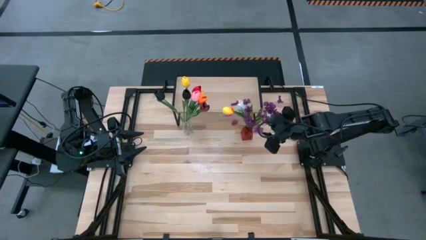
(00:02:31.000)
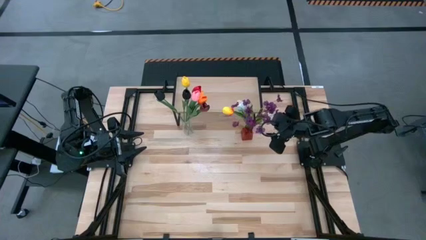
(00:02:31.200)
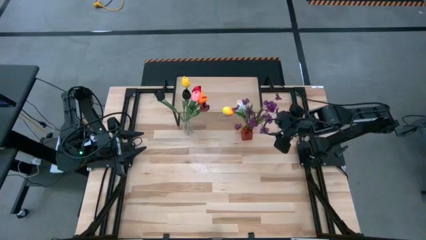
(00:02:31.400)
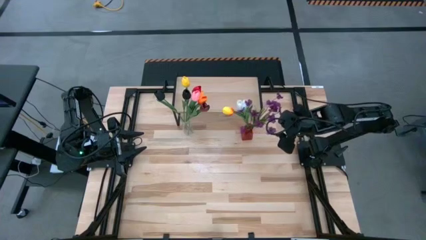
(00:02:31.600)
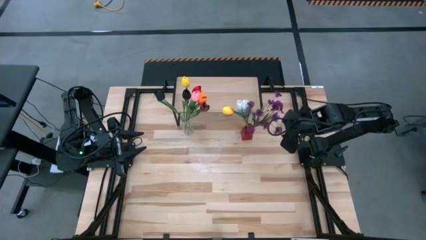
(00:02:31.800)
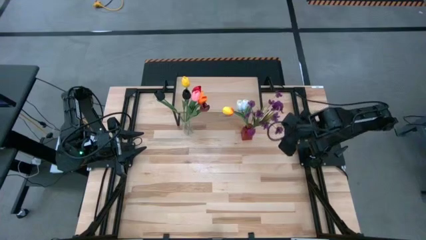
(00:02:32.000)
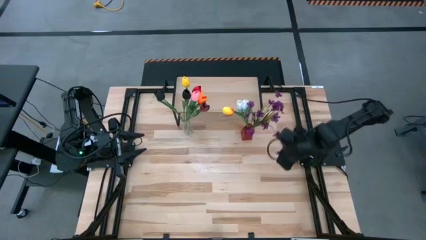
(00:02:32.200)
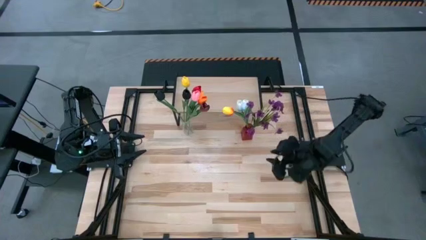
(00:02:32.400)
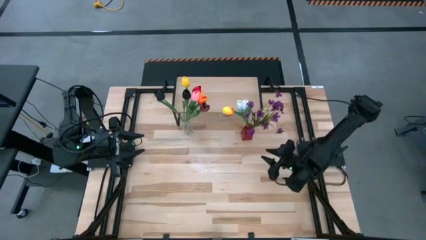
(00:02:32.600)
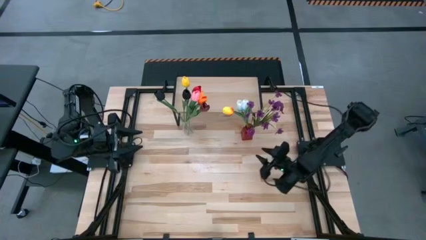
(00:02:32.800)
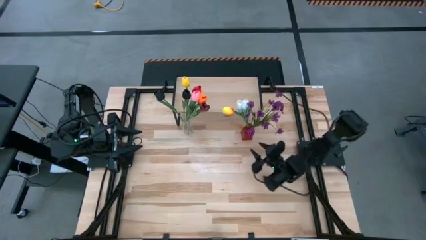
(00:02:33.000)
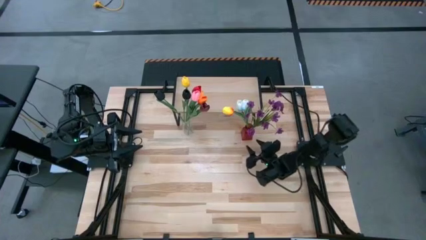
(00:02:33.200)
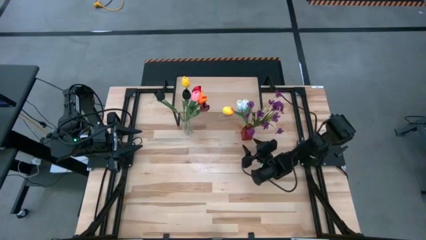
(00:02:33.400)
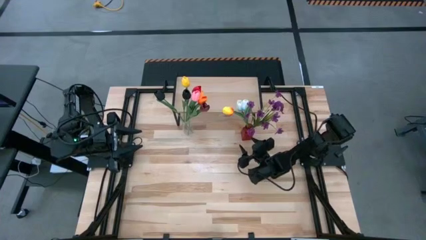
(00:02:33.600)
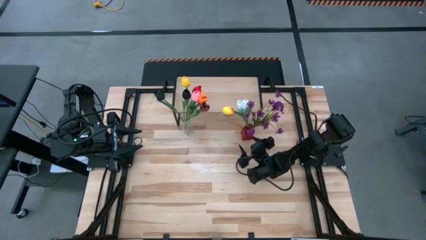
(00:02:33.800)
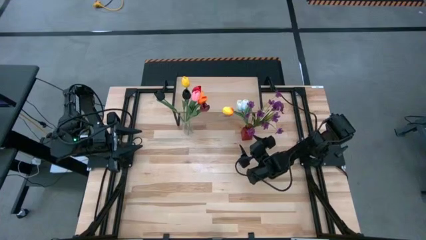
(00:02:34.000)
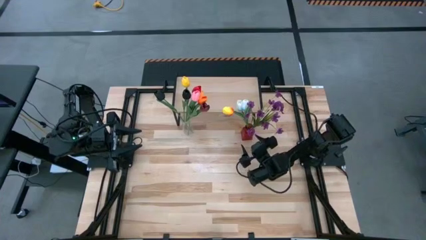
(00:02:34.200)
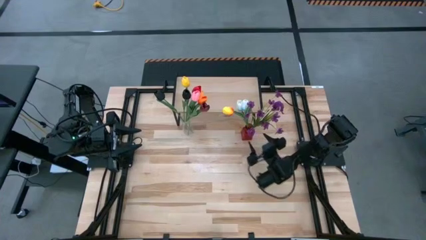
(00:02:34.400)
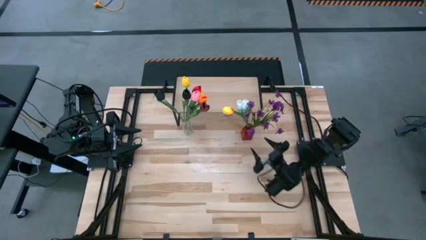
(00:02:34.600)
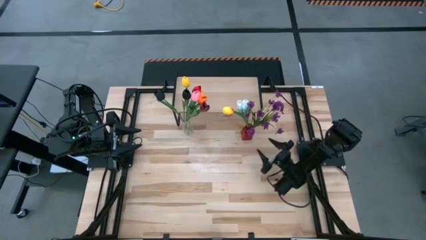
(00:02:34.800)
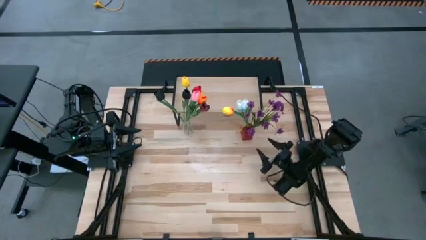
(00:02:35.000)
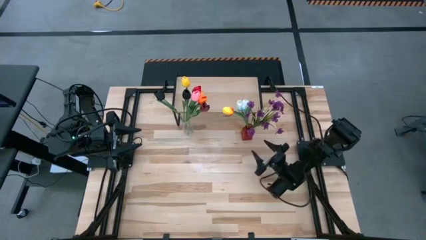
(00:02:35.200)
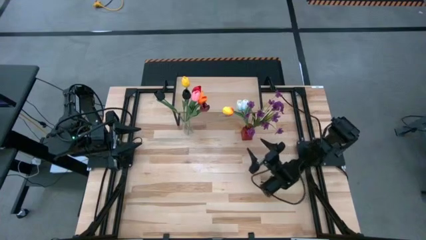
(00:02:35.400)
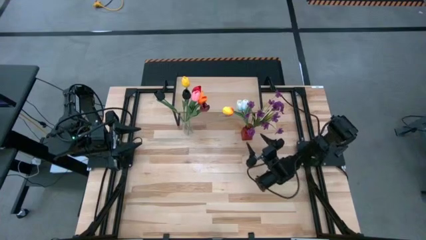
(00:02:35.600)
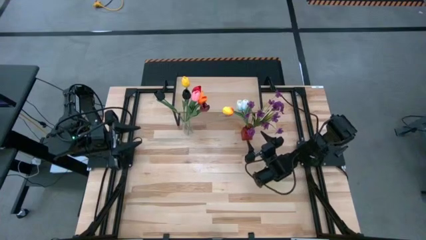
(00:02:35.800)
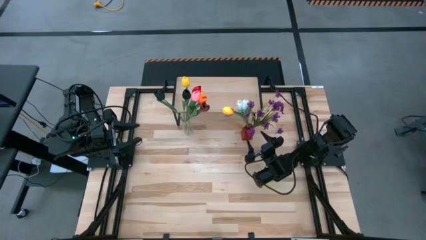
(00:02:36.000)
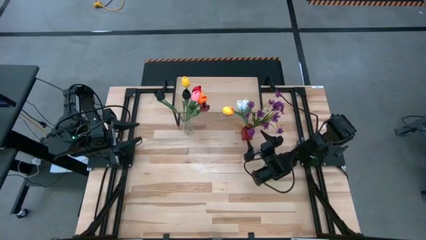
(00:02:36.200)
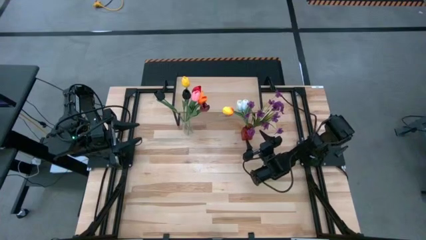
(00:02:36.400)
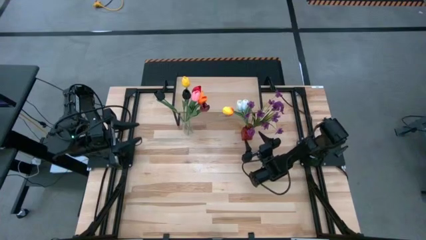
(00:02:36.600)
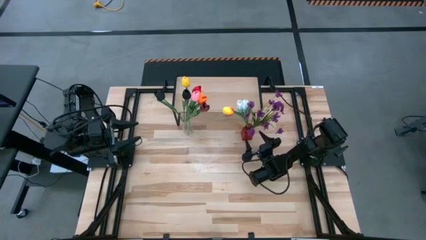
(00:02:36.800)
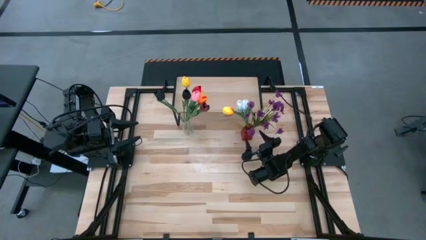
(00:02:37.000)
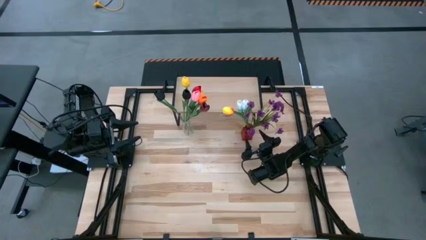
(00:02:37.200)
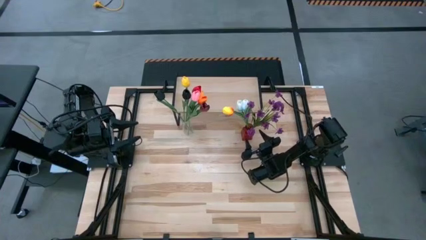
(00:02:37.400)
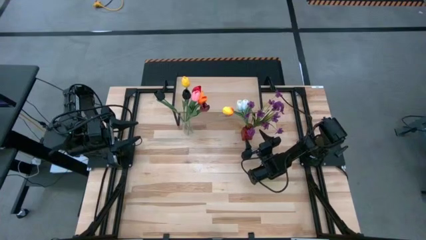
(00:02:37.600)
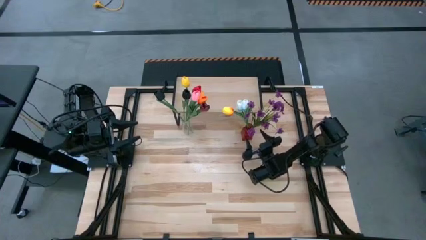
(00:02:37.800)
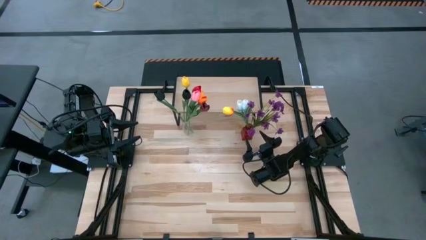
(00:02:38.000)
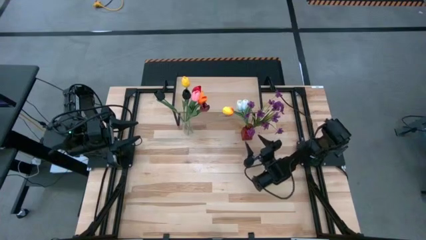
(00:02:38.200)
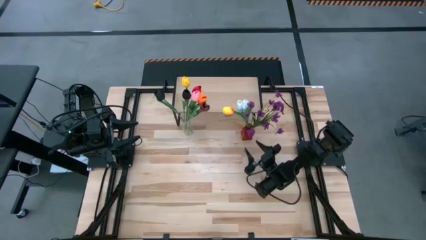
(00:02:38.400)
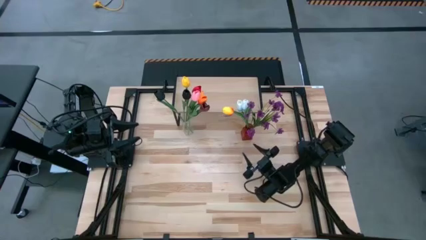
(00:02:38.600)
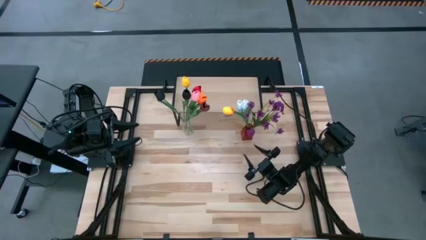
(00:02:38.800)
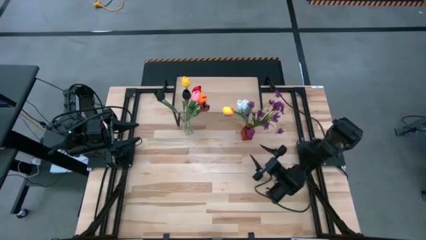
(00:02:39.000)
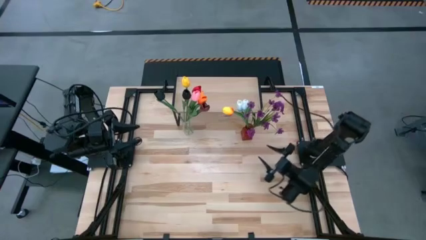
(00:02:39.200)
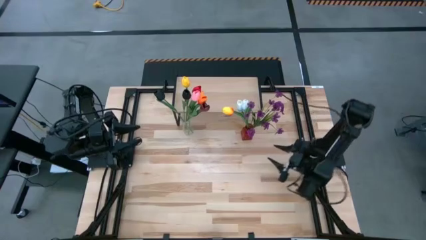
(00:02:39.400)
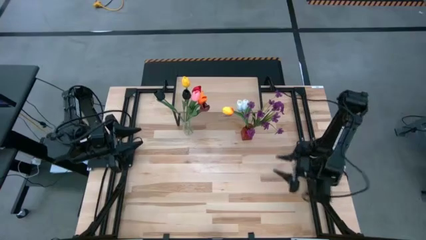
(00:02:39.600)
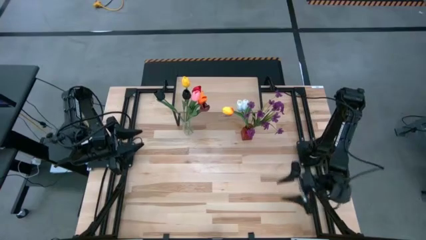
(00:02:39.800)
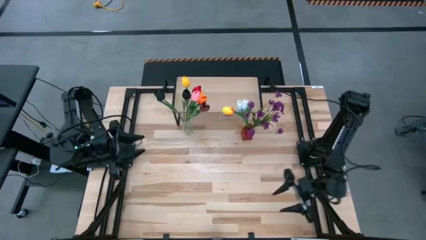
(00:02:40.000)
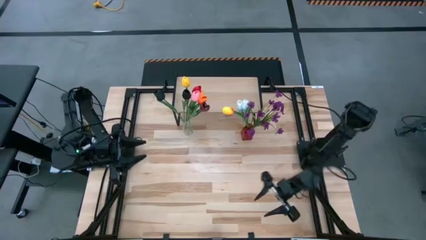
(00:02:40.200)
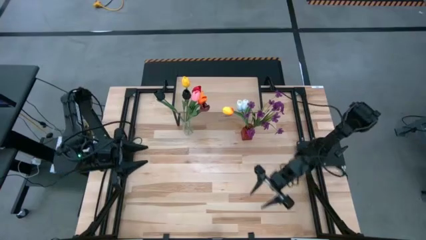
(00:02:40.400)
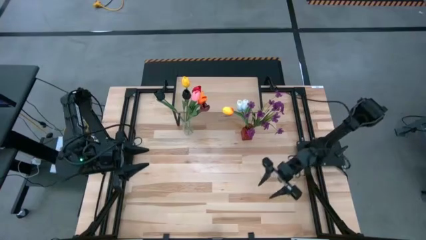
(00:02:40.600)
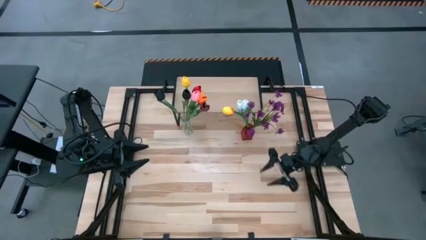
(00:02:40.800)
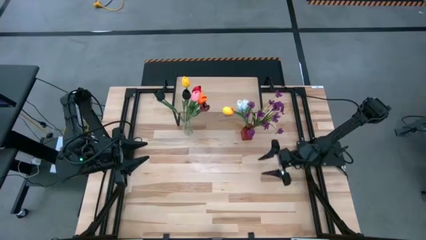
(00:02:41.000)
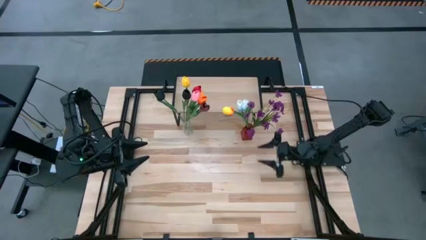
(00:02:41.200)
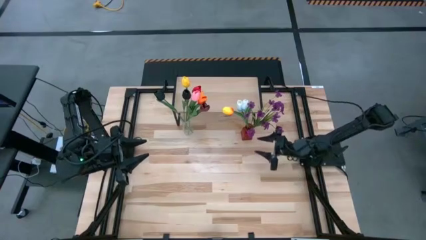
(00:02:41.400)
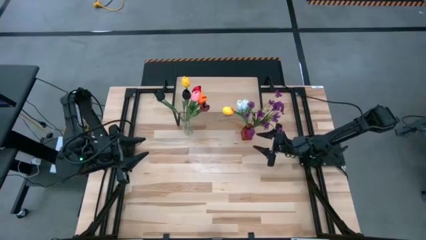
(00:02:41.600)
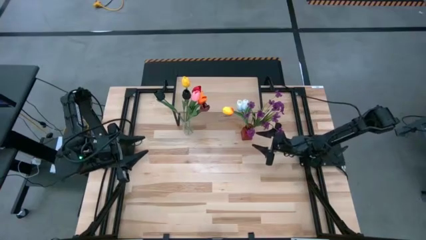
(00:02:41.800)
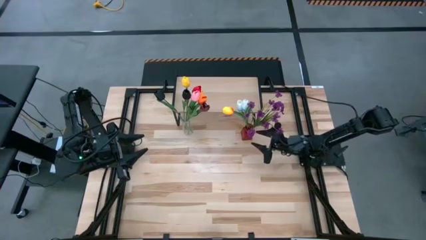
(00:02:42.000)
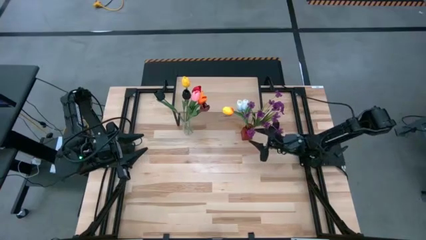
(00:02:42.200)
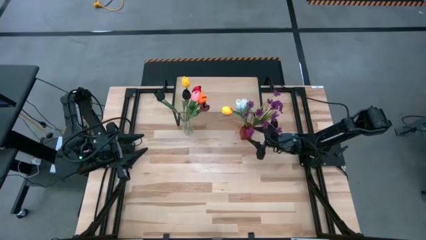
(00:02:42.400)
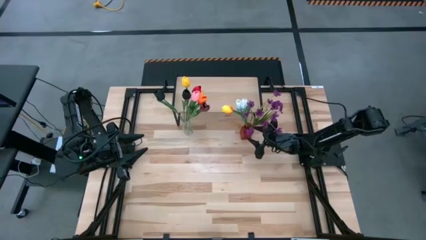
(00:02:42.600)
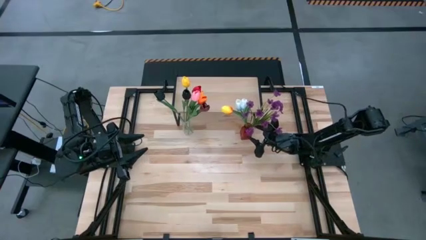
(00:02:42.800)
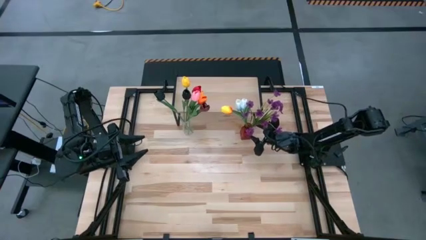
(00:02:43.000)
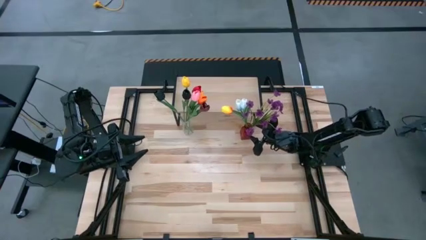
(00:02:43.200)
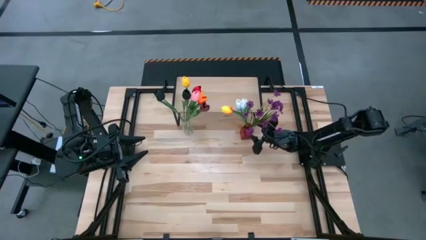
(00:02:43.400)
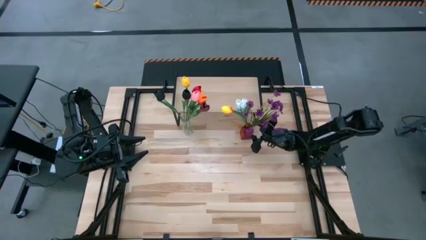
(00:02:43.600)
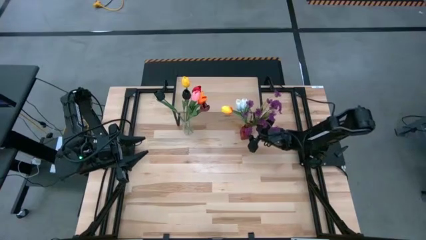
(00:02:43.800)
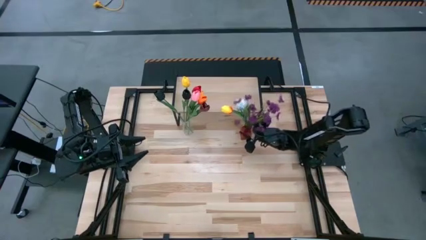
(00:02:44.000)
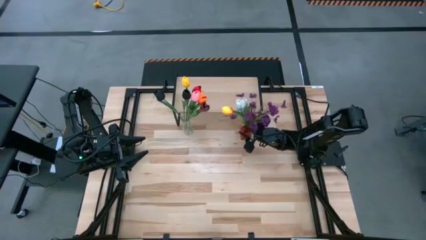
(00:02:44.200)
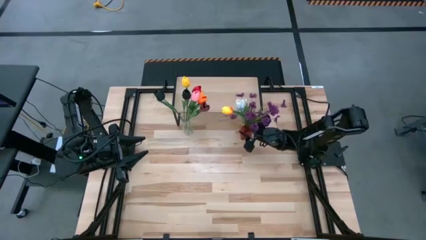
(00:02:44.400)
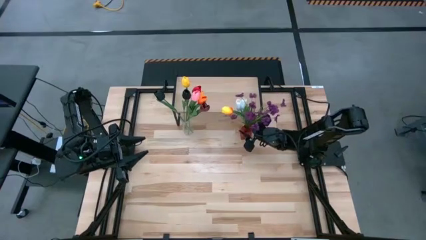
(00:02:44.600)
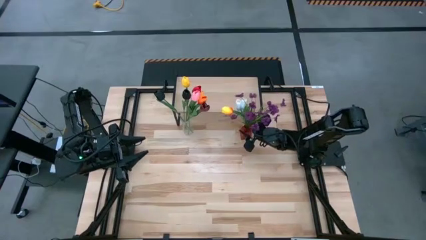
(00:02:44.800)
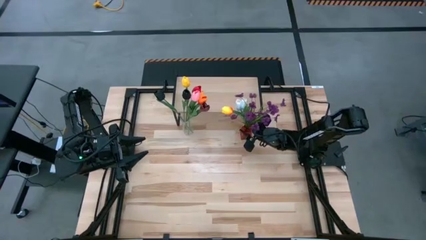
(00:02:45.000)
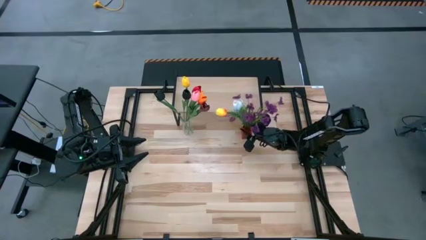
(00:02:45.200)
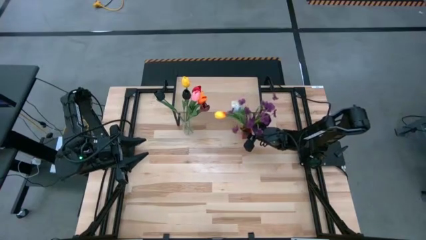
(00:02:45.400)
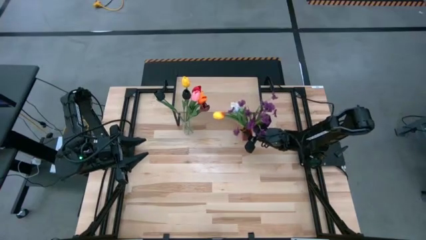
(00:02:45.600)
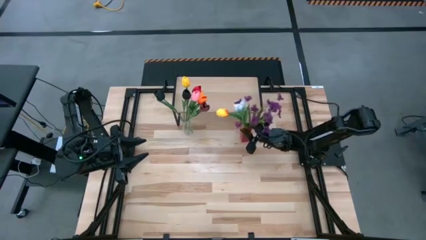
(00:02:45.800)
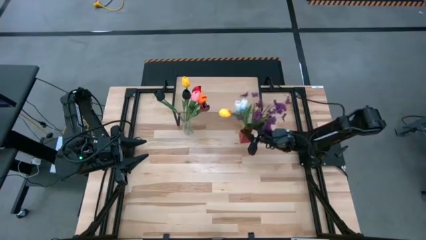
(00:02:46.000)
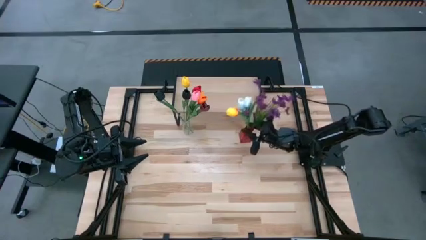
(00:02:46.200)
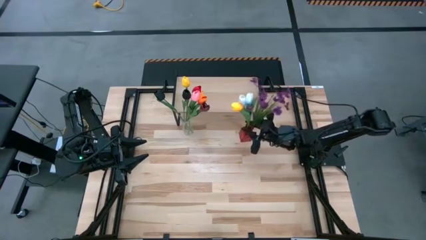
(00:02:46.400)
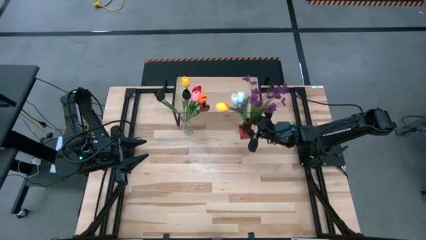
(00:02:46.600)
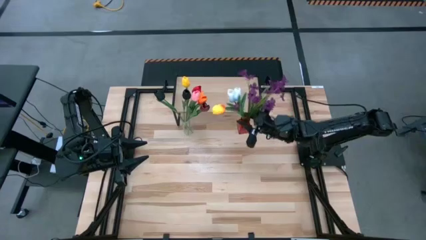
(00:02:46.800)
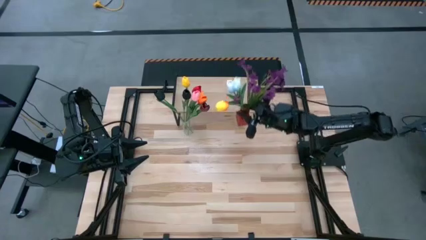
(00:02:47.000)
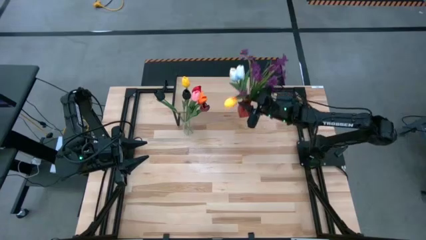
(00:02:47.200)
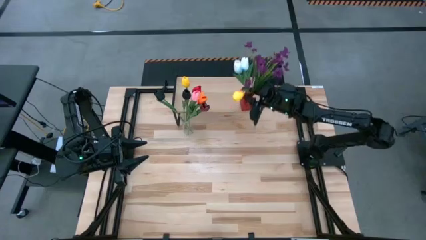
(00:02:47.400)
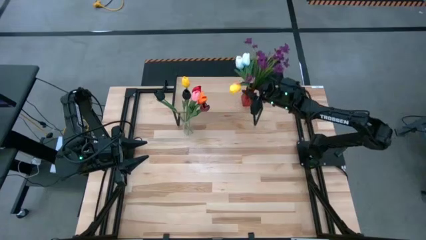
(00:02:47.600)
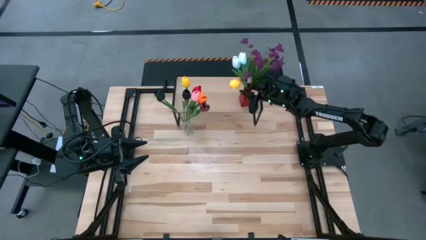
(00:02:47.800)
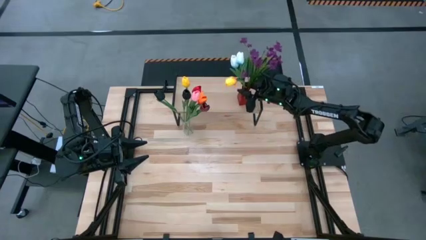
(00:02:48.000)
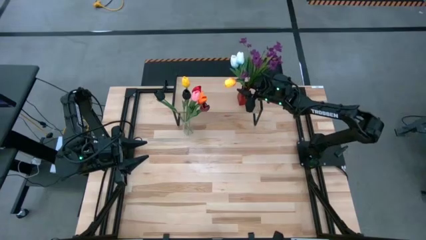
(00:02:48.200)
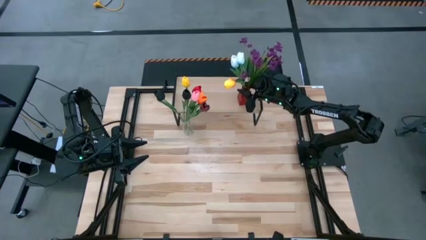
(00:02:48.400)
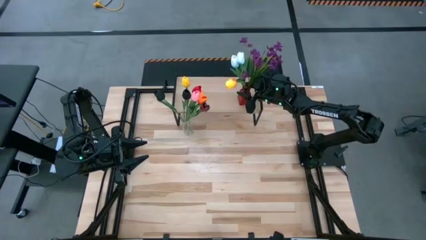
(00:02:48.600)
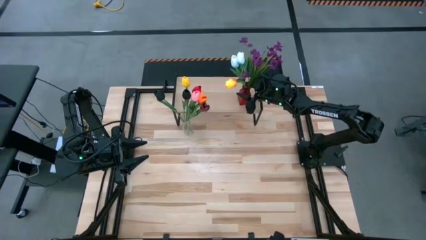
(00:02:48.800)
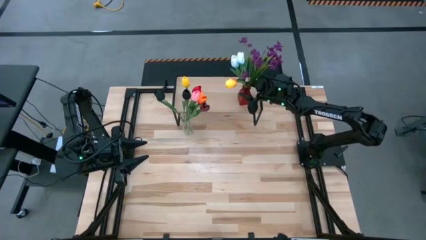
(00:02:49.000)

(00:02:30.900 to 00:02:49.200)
Task: Pick and place flowers into a vace then onto a shelf
Put the red vase on the shelf
